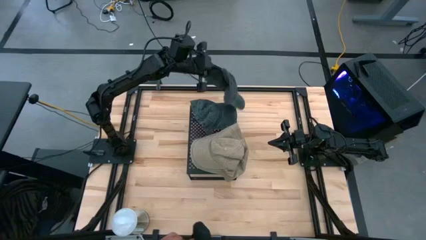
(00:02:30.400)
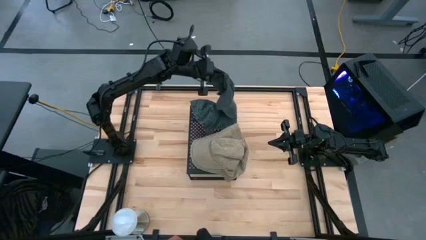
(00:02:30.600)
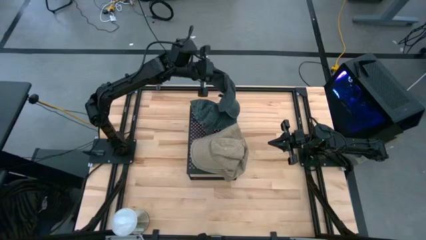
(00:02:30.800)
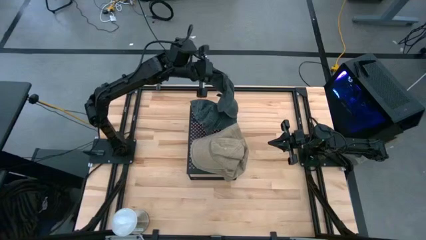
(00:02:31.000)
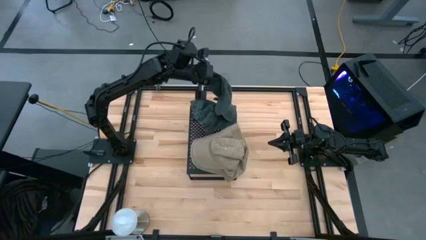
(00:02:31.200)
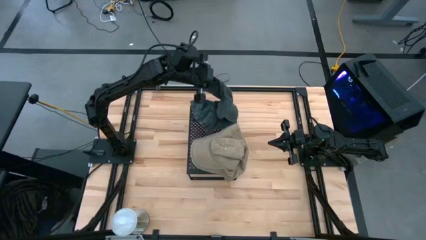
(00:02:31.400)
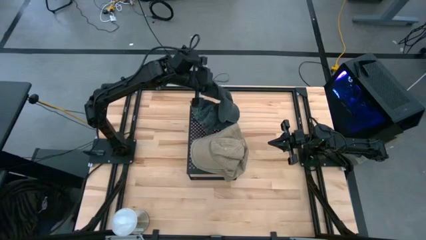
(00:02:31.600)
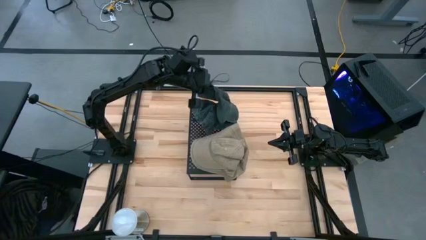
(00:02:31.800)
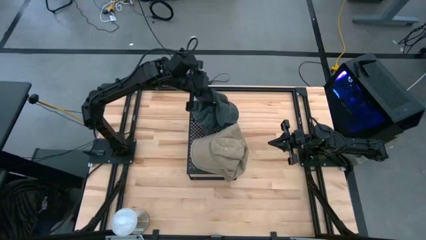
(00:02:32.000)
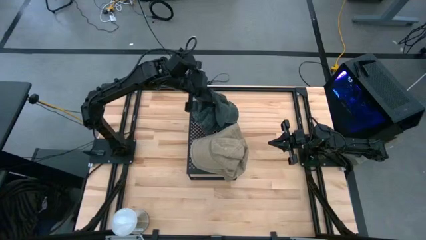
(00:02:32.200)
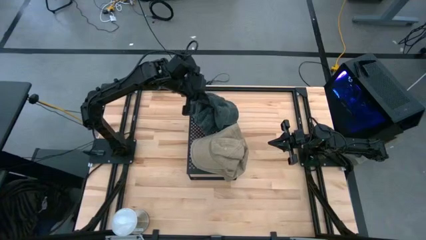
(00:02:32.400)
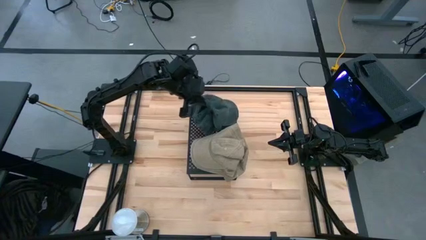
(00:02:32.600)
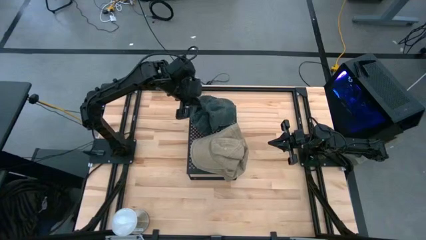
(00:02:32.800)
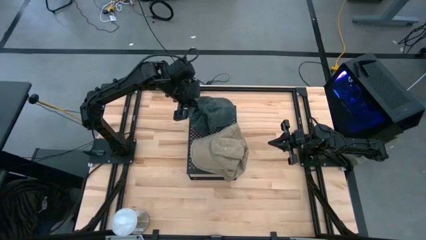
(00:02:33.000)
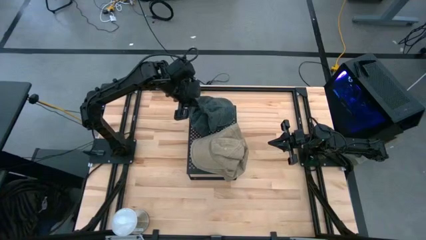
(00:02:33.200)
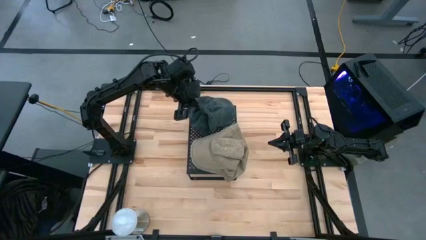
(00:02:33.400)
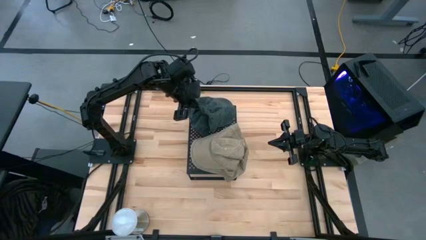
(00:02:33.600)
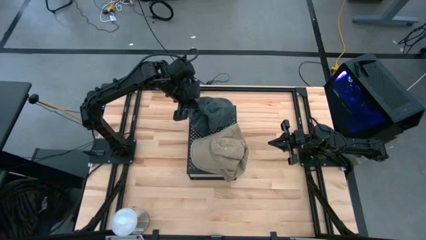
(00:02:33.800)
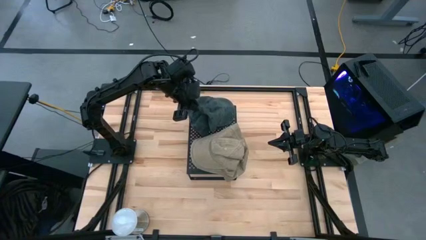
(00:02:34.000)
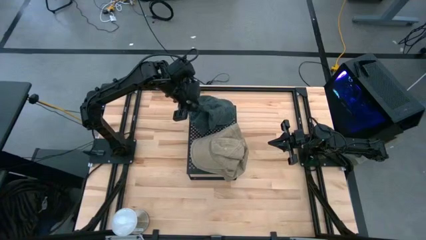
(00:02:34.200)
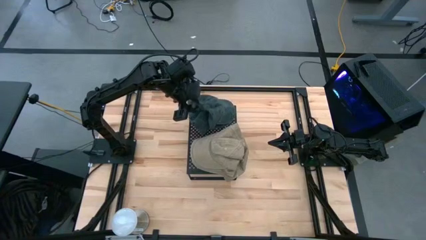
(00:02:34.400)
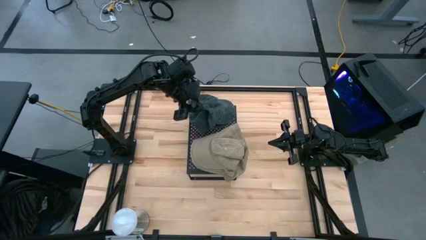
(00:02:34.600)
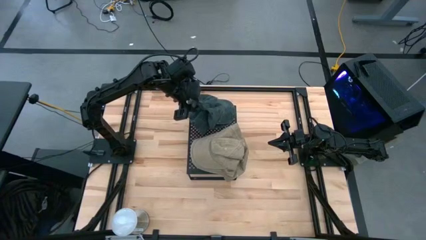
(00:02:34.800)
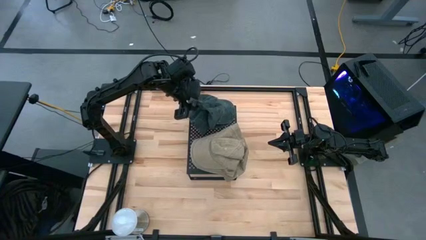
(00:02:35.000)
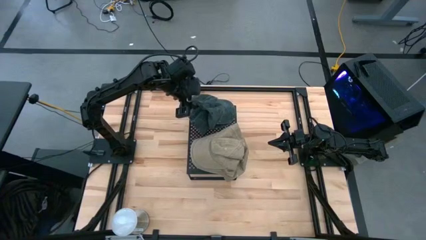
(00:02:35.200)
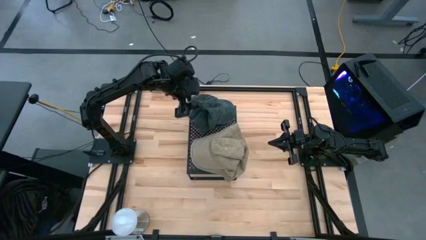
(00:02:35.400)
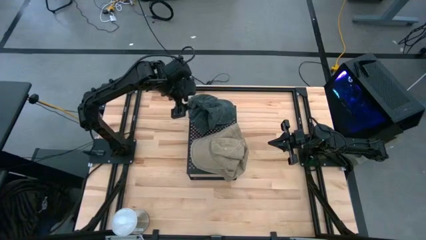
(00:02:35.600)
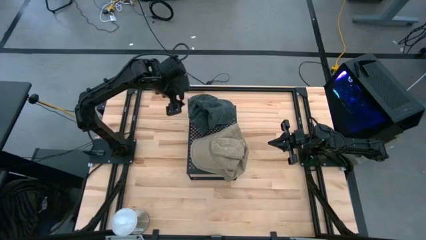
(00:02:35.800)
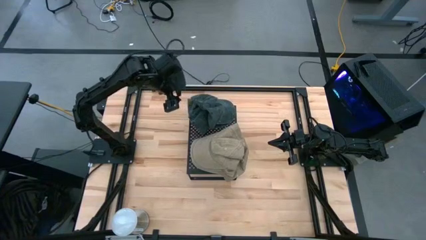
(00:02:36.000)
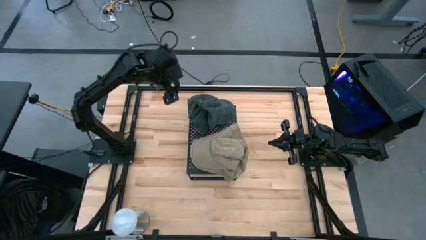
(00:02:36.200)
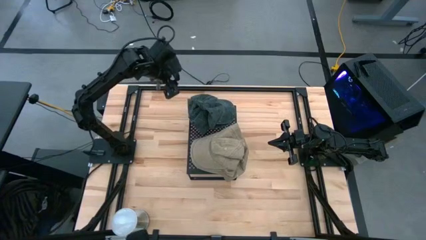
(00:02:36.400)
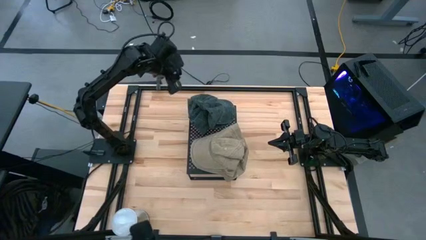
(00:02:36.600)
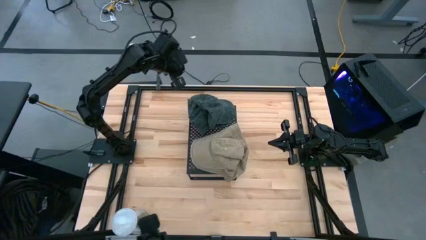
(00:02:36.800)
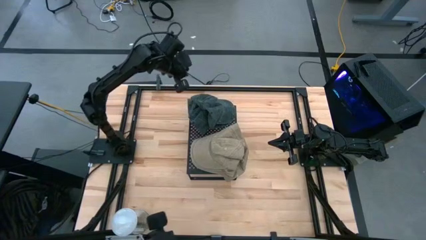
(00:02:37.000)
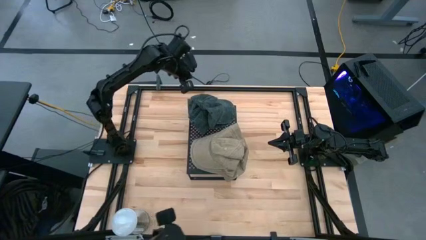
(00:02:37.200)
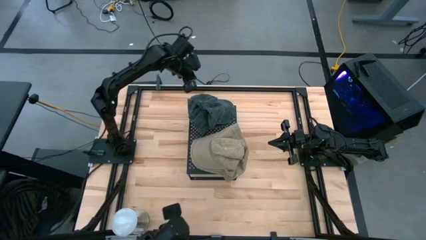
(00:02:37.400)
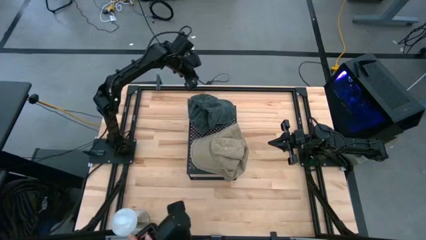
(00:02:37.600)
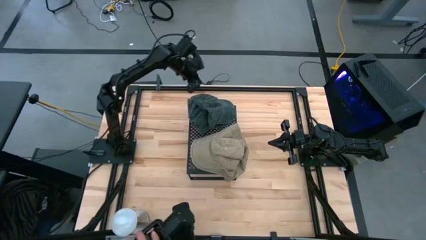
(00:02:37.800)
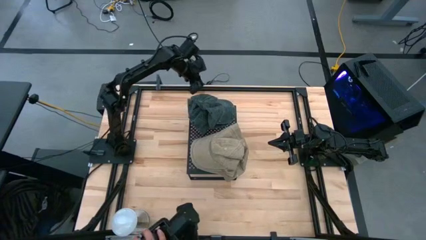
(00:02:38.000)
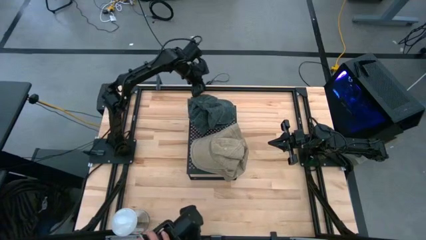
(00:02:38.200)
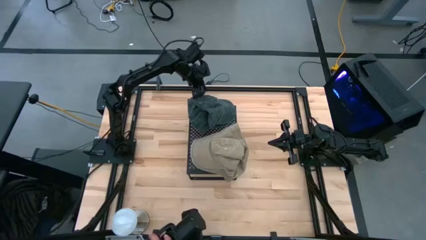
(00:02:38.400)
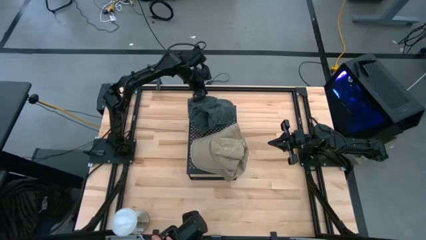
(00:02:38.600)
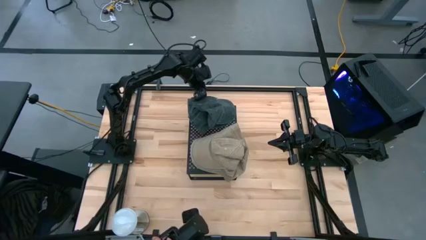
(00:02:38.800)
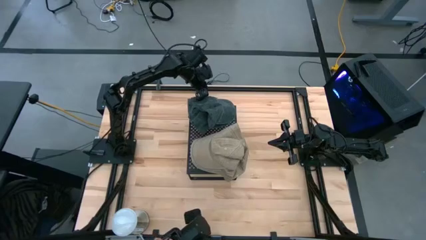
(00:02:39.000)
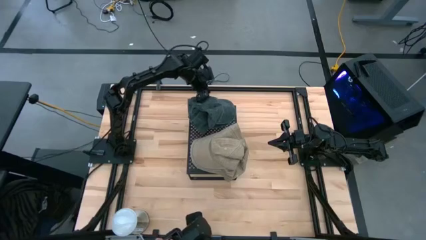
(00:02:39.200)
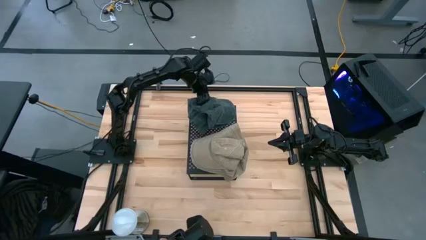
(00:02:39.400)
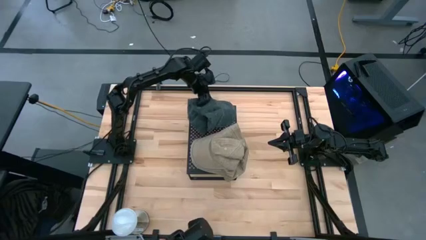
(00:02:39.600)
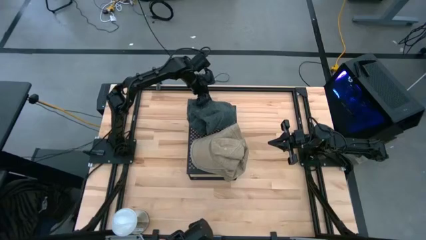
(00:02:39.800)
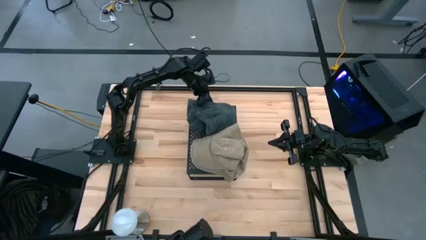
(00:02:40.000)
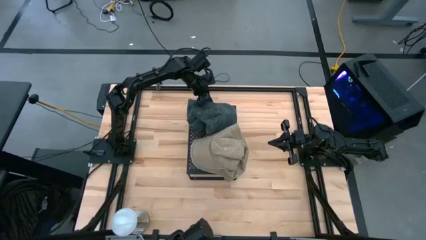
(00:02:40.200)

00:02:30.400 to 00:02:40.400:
Task: Pick & Place hat
Stack the gray cap on top of the other gray cap on the shelf

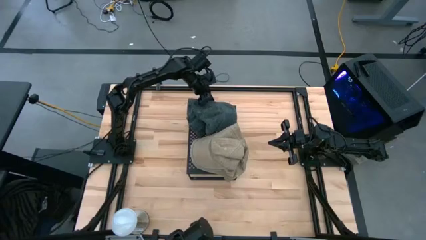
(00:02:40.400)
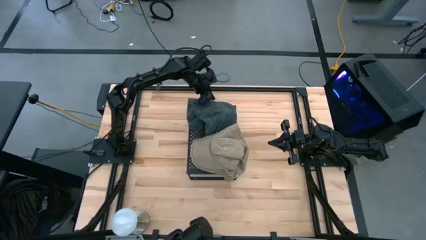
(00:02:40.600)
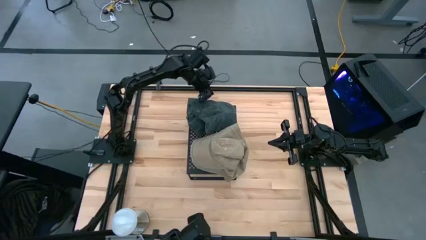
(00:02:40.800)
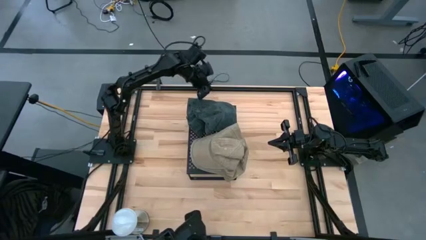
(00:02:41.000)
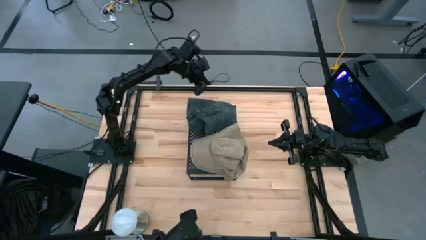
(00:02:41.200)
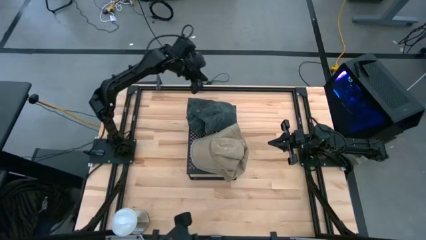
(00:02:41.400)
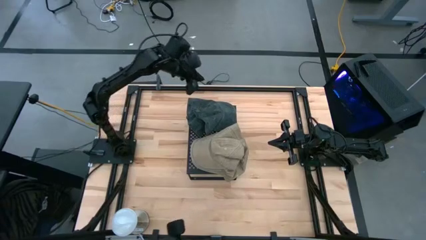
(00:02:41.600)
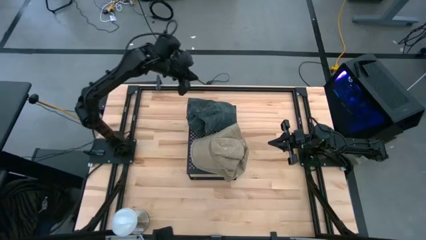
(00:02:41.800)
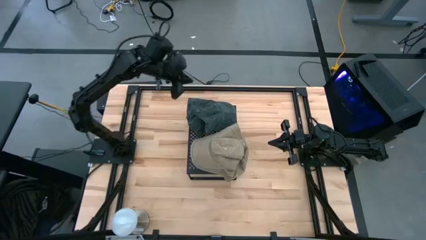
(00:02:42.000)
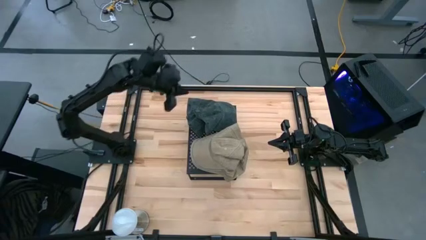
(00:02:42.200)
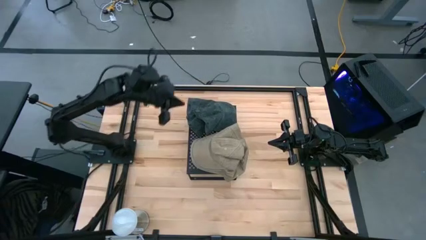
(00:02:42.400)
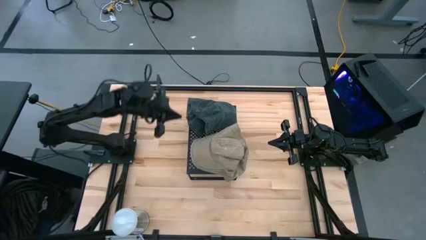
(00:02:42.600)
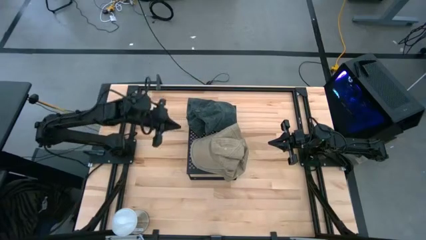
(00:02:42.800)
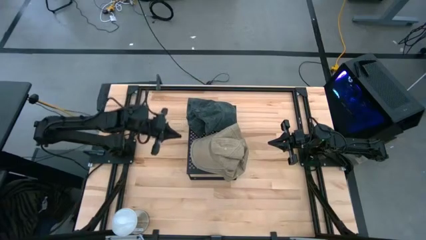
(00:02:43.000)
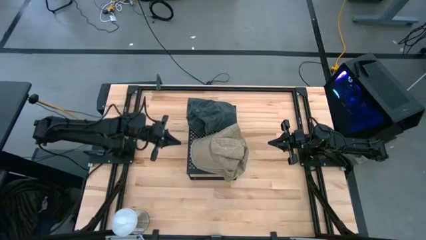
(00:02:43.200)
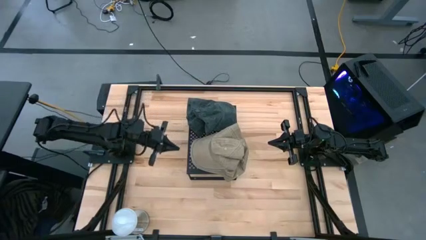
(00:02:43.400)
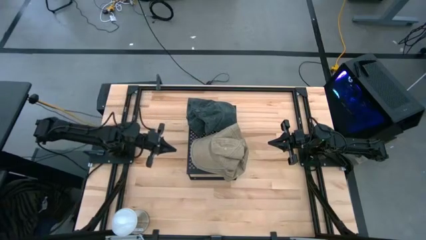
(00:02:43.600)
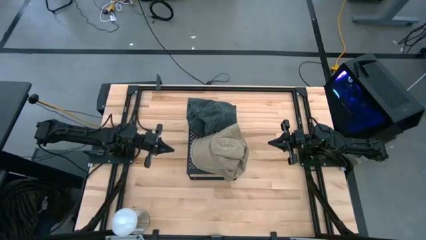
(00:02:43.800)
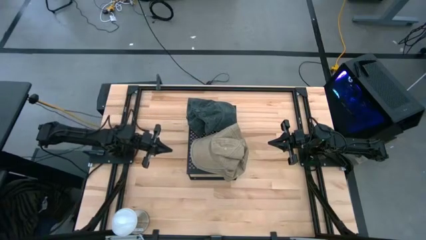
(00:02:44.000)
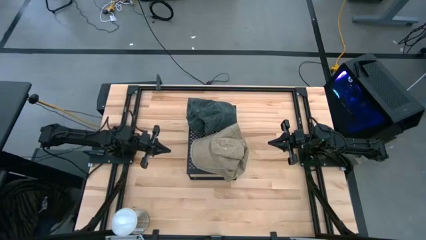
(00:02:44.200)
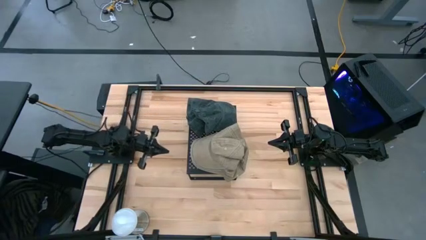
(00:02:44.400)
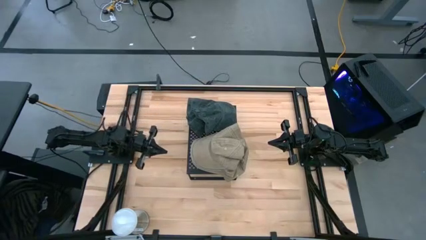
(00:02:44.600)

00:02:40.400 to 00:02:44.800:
Return to Home Position
